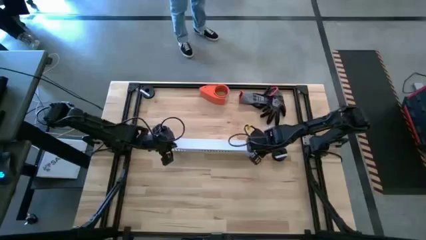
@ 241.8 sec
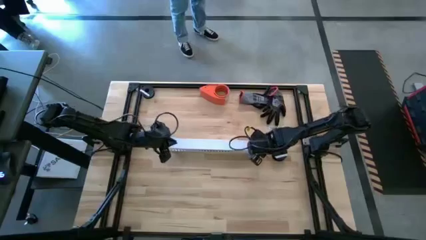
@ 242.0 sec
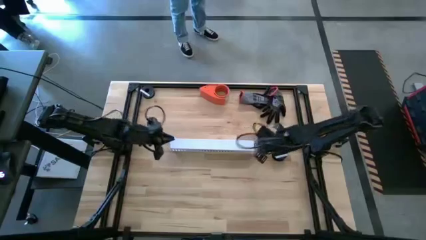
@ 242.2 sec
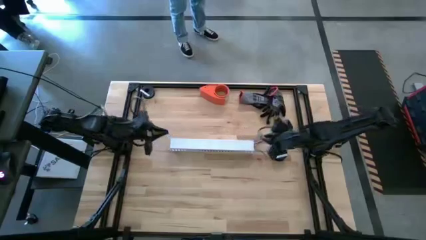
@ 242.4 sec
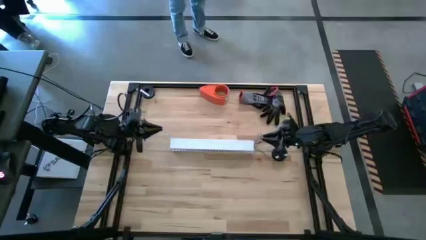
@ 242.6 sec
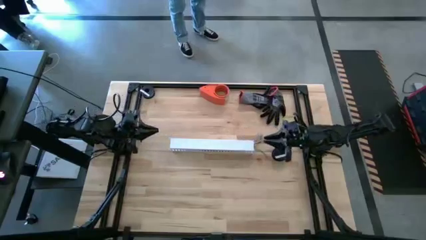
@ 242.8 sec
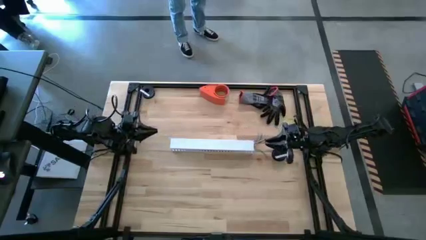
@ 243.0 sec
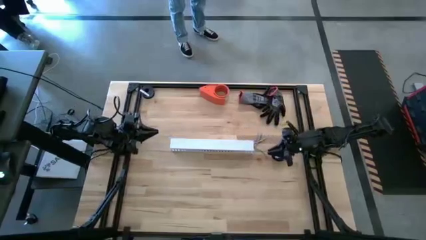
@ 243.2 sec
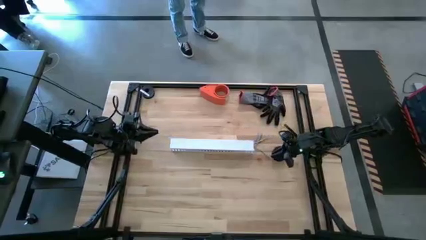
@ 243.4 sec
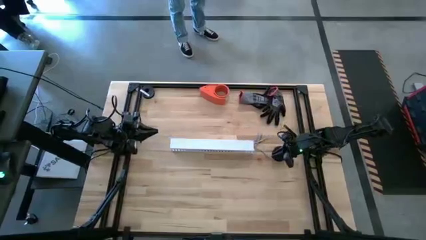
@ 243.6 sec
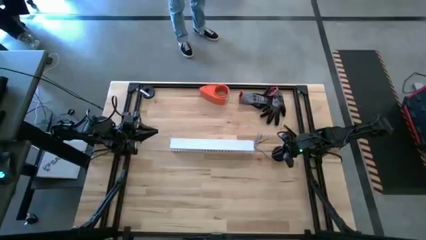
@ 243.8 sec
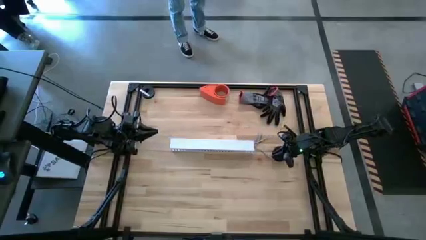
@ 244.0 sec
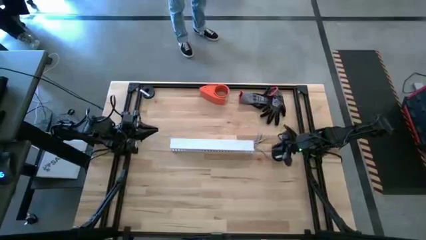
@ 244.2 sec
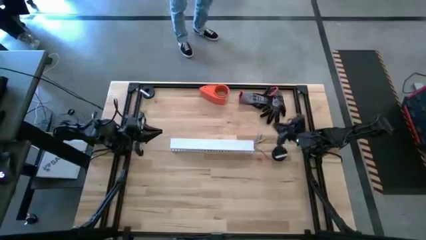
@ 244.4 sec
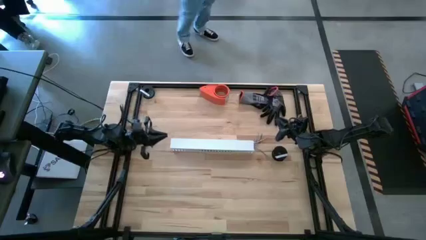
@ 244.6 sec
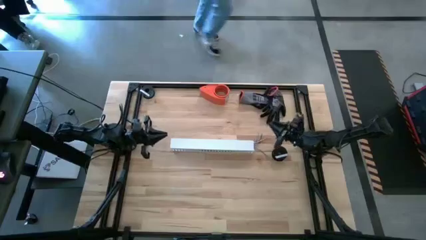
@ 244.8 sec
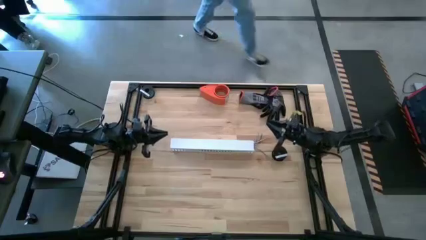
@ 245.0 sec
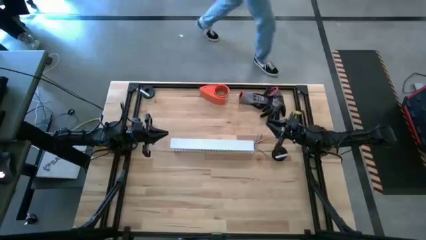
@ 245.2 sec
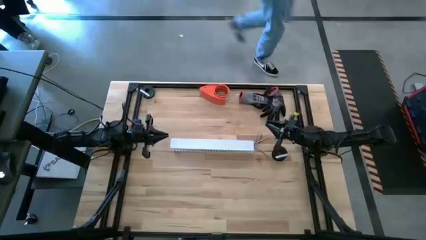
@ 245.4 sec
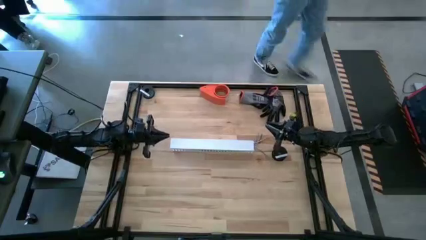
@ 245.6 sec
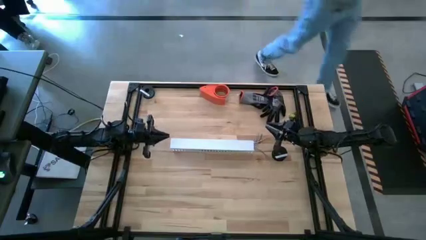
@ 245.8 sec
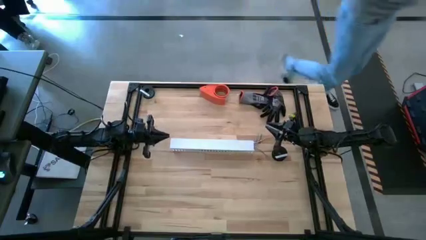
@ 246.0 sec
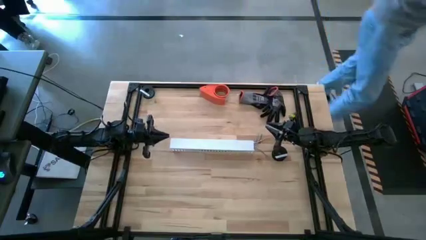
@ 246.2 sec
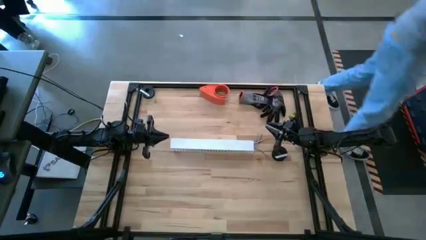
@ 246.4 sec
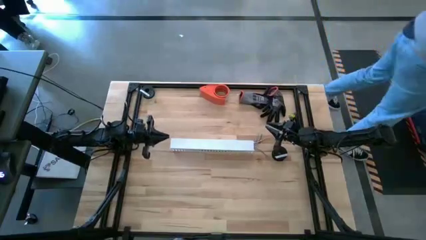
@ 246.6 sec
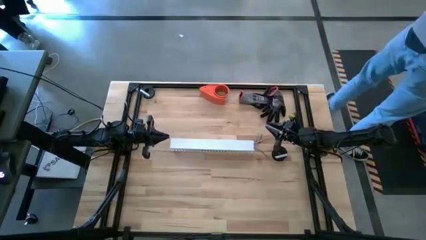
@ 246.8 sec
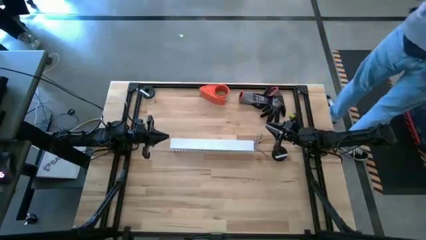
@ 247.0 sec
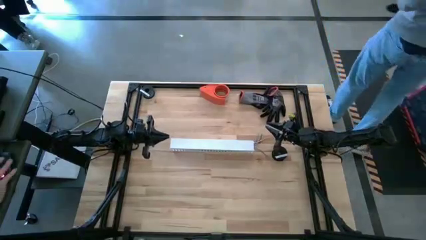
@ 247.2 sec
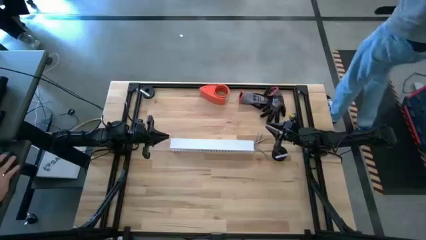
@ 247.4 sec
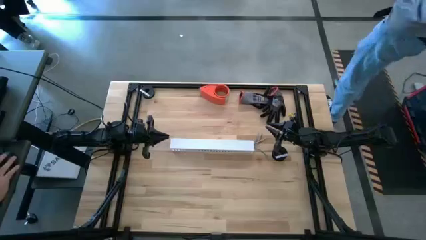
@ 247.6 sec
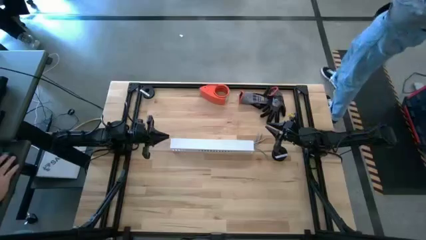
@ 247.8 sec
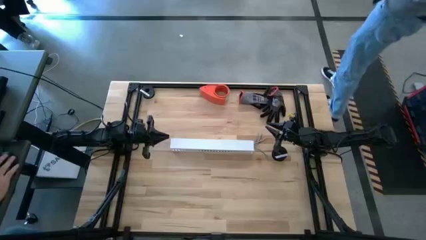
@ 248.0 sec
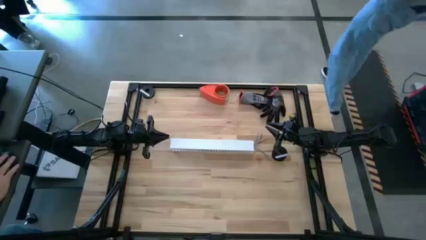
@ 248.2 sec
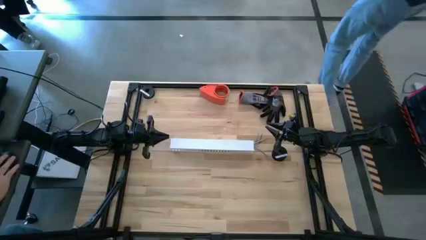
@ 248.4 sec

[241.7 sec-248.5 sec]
Task: Ziptie cables
Return to Home Position

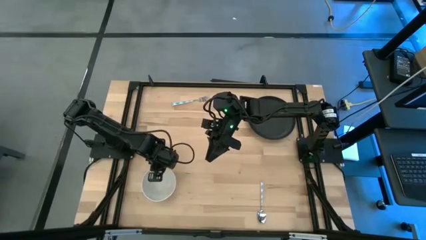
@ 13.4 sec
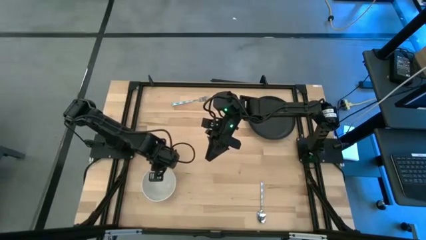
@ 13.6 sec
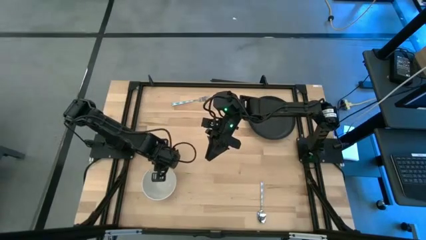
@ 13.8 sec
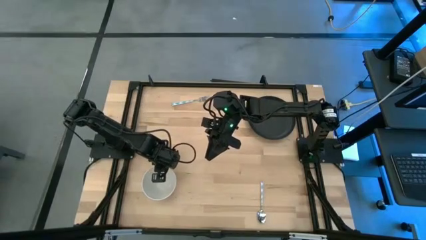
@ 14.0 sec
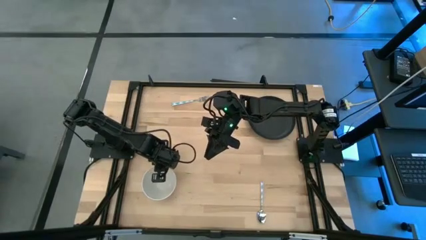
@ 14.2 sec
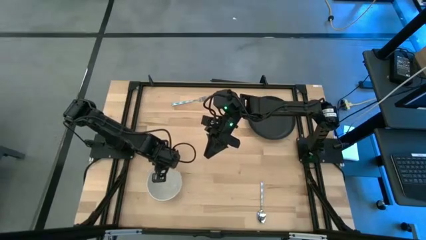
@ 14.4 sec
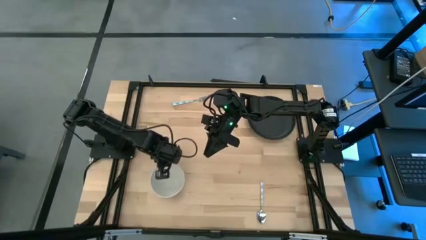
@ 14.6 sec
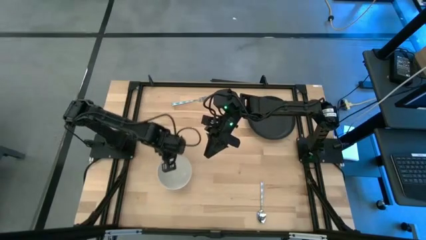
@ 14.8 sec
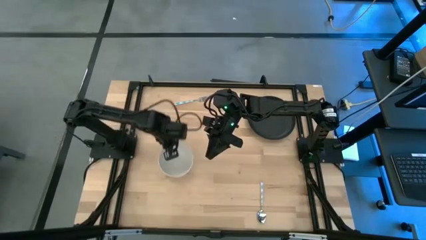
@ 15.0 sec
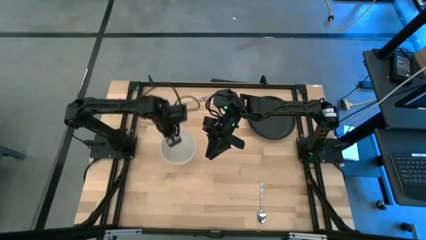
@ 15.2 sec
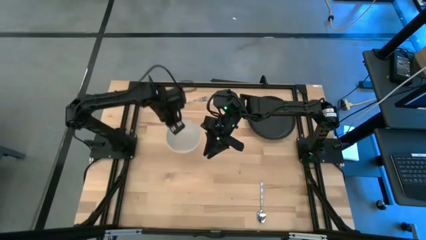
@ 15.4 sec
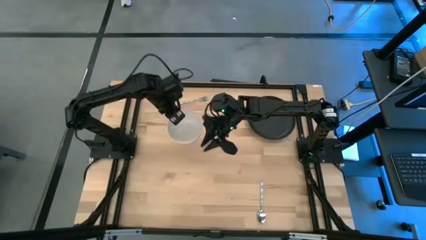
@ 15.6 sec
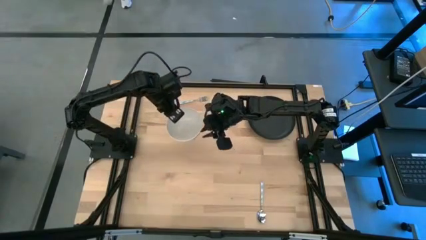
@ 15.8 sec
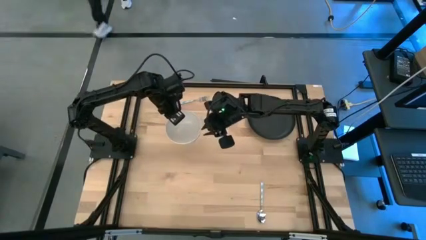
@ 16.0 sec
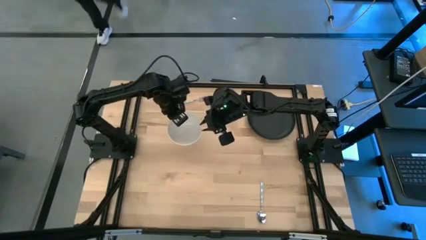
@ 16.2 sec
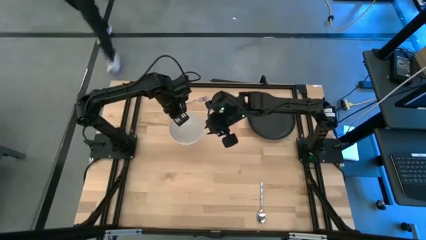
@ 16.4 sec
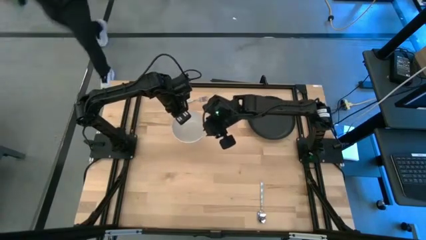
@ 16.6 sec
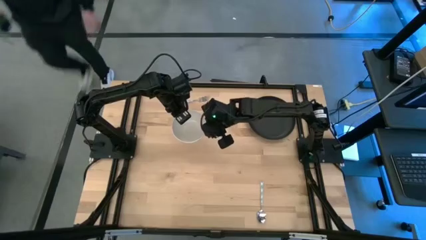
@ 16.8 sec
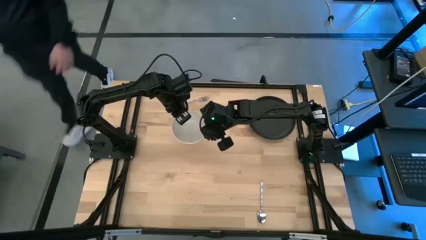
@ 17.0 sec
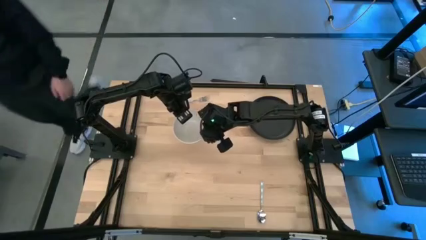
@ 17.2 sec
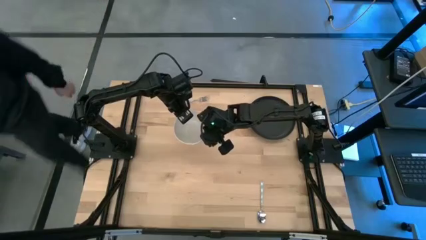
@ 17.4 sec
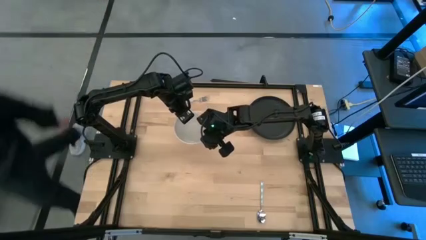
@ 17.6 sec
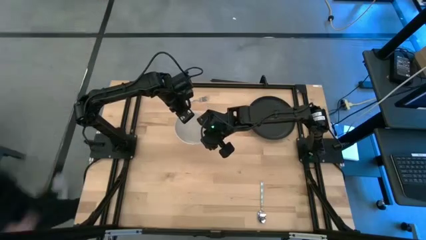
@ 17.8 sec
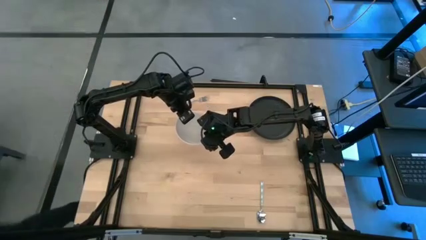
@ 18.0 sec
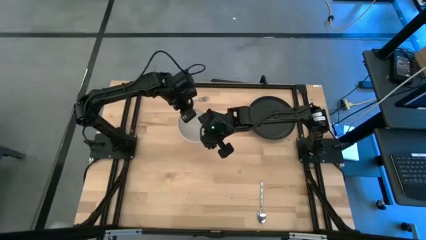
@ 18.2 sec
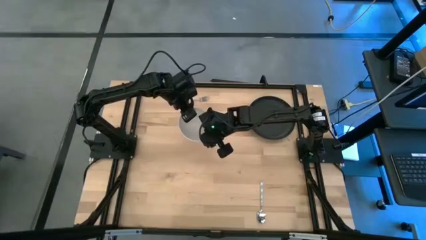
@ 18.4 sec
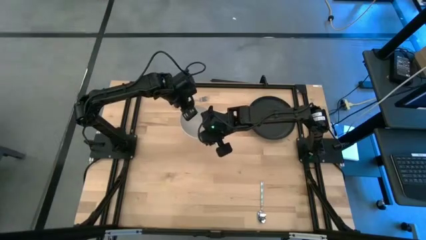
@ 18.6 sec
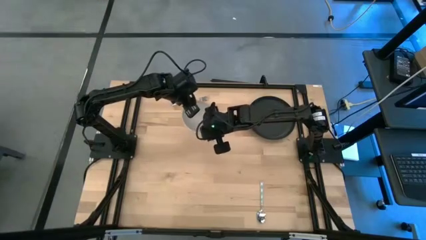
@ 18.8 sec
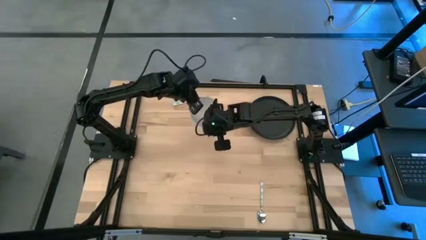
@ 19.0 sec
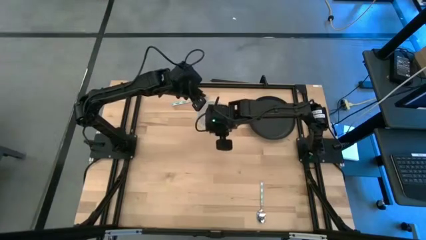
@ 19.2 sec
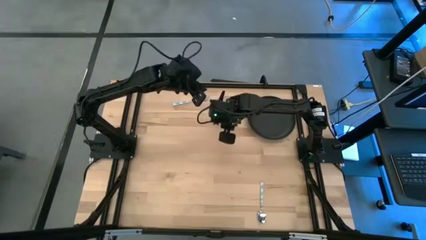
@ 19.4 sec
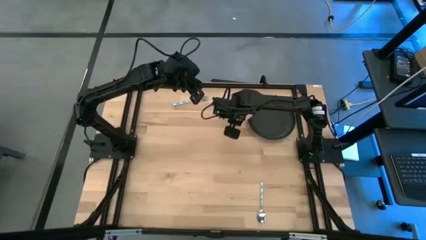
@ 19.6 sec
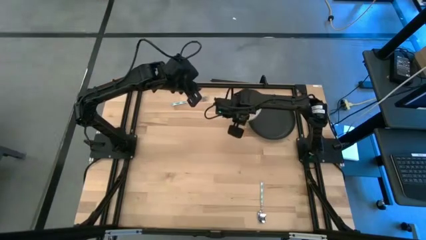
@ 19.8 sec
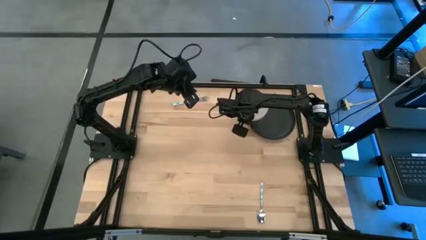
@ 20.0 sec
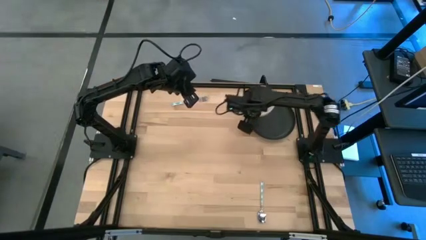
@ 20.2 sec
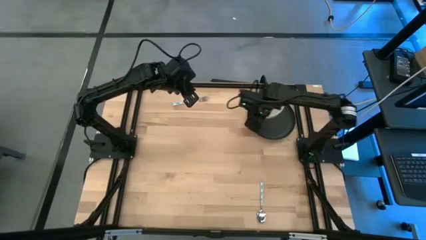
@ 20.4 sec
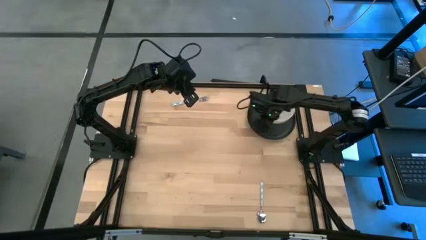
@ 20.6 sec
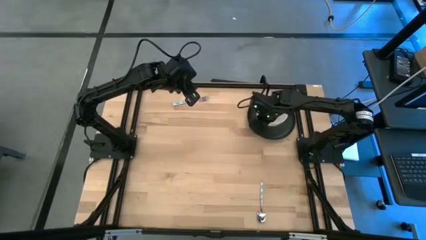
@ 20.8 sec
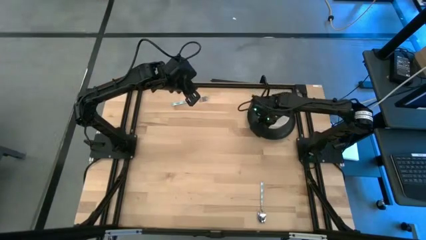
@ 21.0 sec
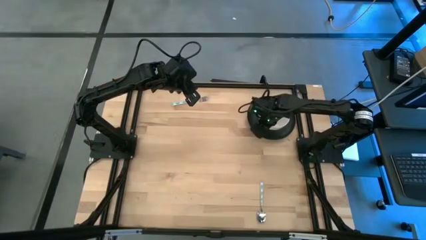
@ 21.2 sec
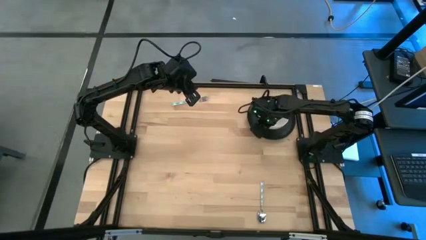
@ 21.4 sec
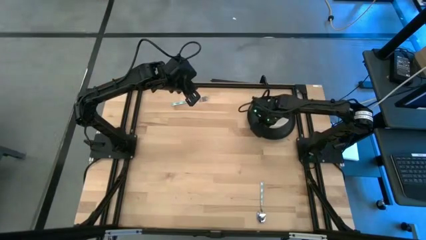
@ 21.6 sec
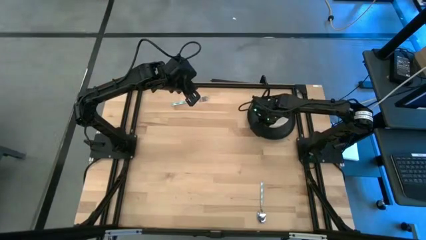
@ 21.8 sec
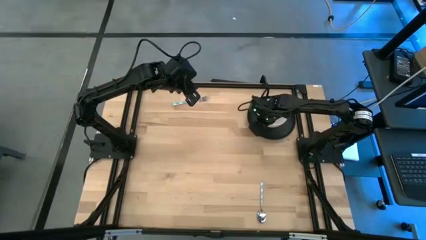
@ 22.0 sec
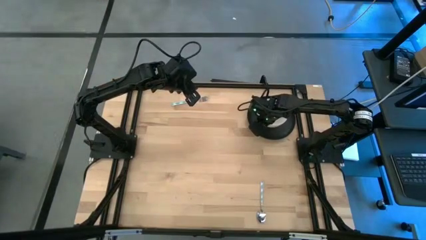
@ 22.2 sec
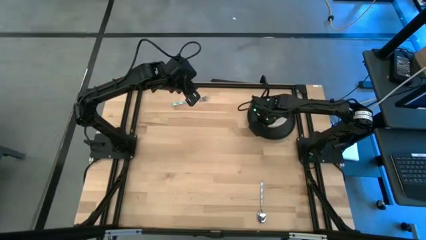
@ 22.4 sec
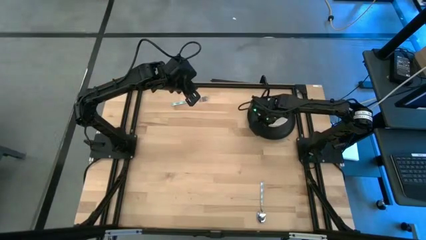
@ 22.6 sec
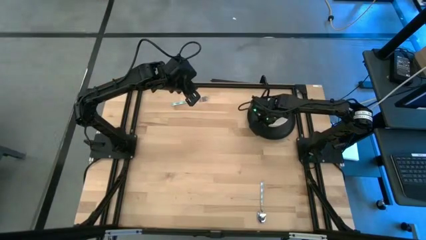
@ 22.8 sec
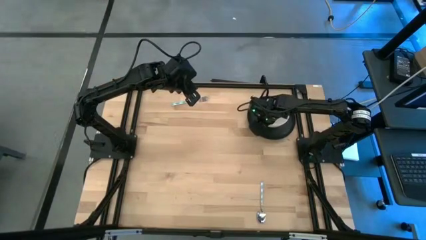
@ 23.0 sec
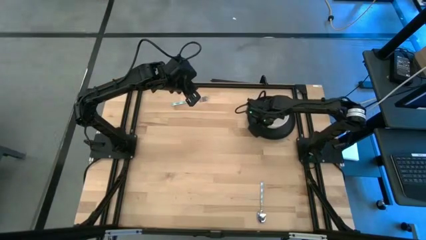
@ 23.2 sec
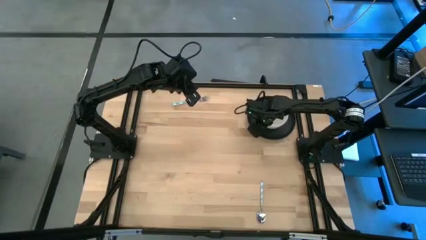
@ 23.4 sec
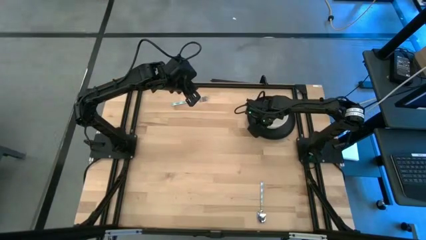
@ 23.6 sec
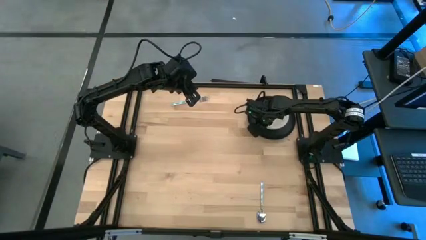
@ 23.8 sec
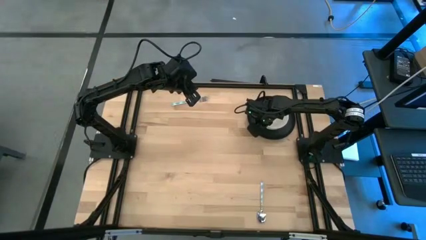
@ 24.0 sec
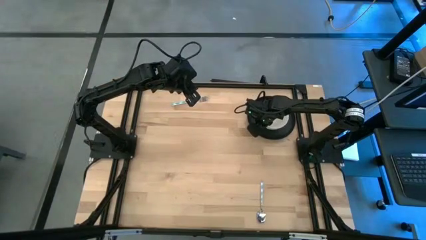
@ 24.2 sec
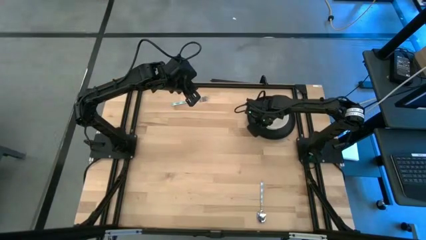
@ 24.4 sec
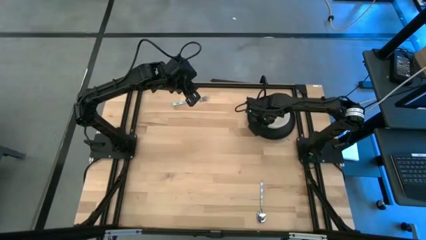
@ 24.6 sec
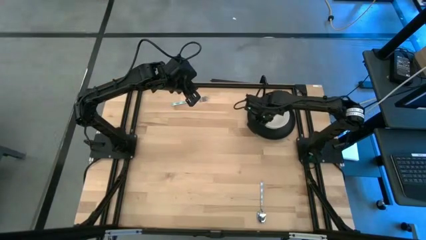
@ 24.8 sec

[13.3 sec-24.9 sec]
Task: Set table place
Put the white bowl on top of the black plate
